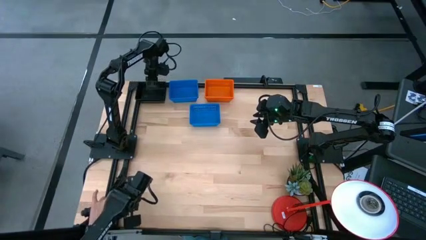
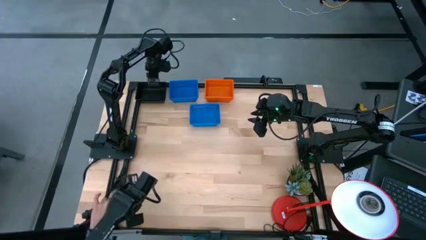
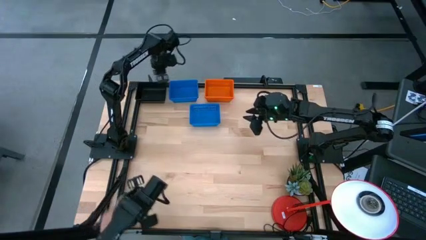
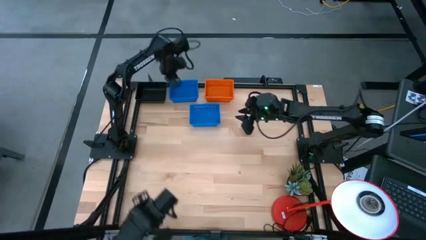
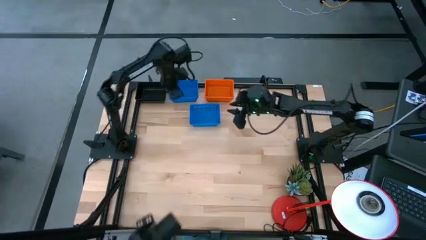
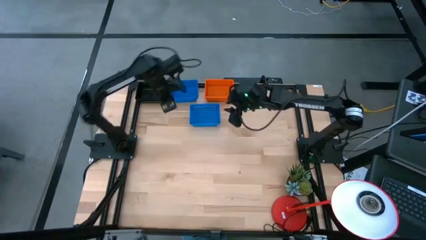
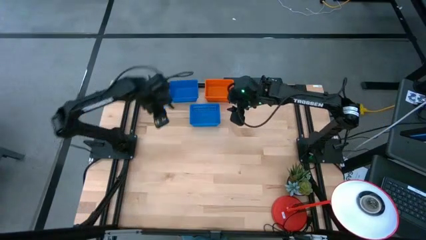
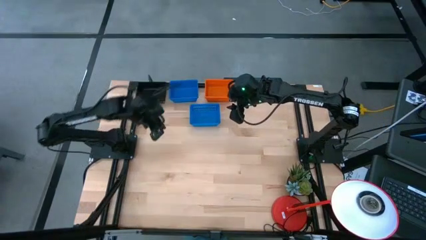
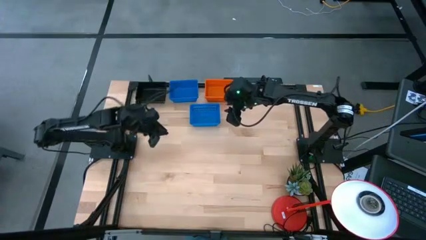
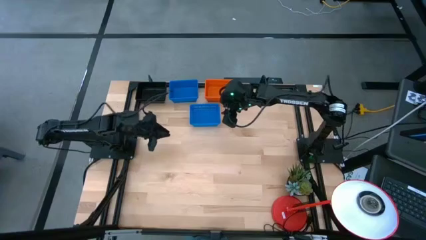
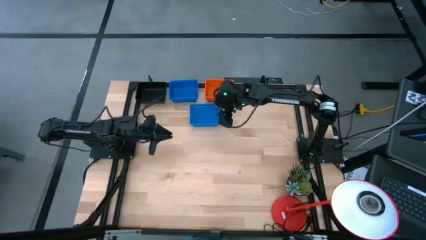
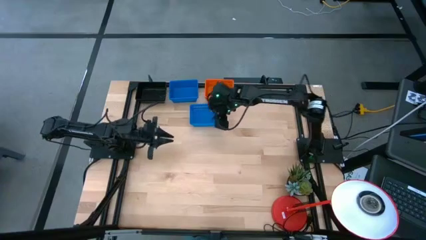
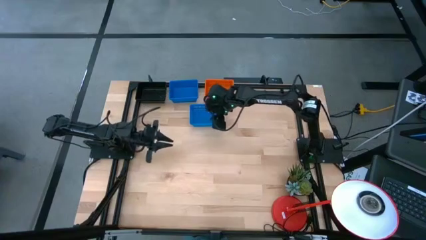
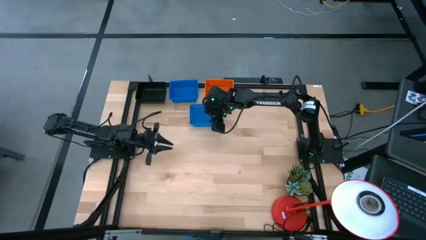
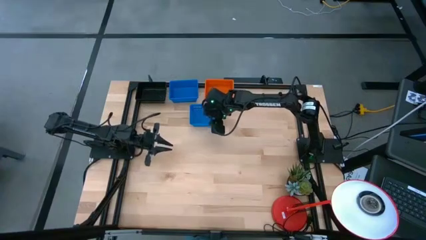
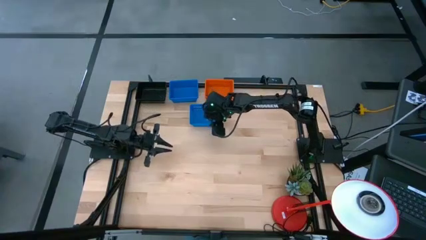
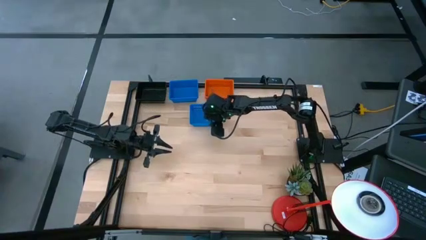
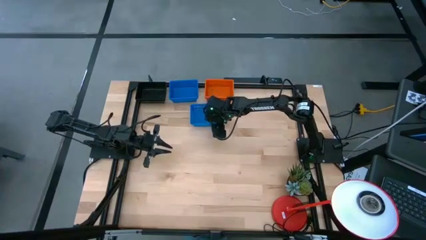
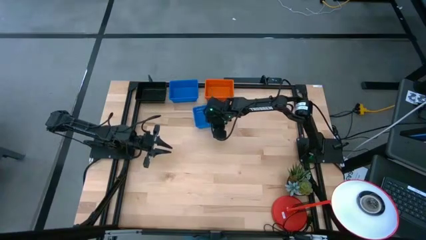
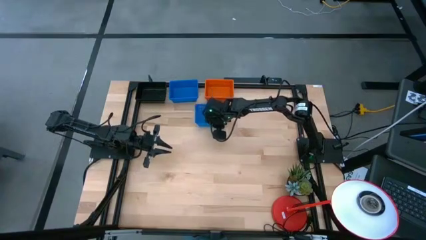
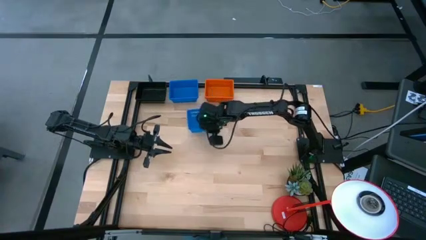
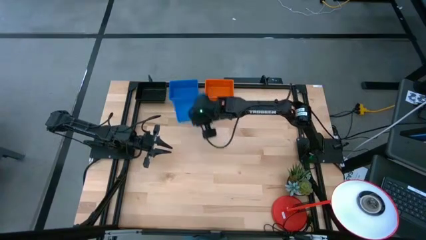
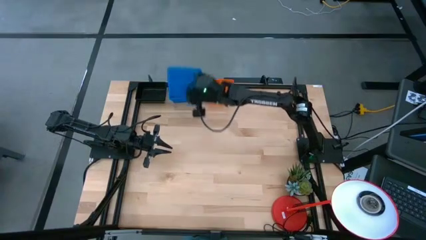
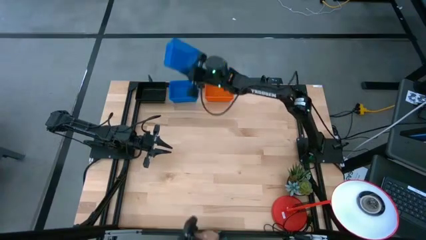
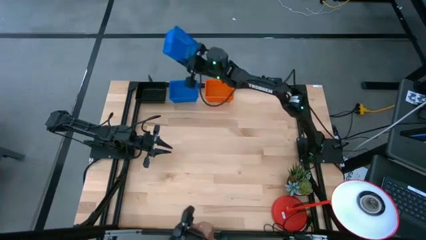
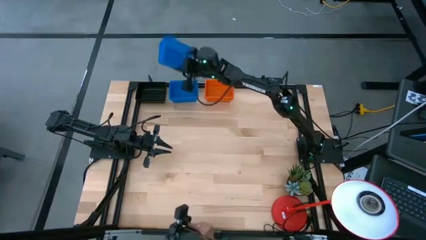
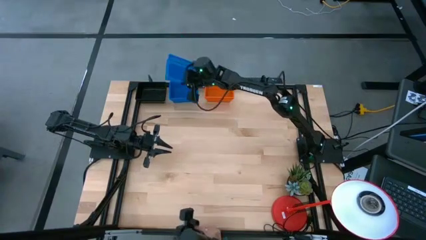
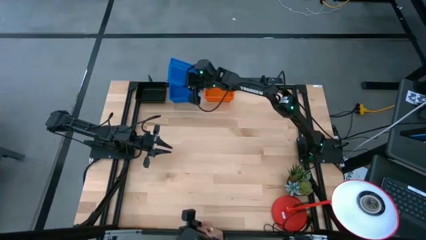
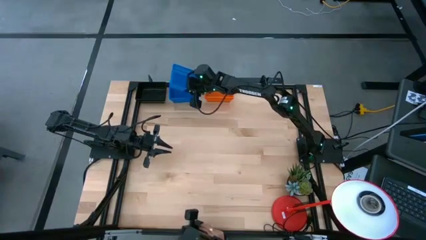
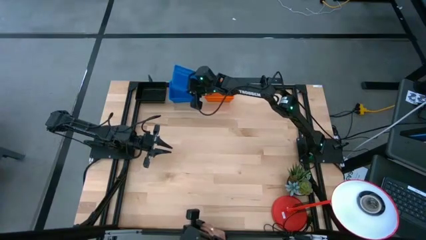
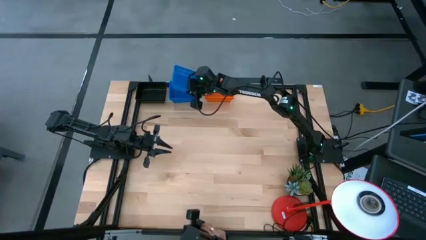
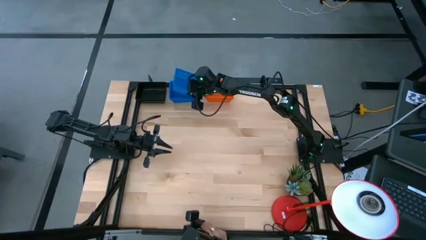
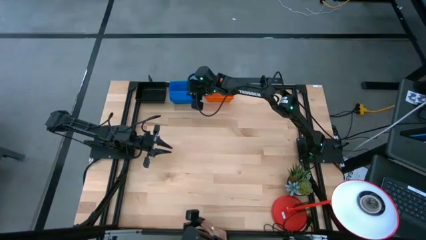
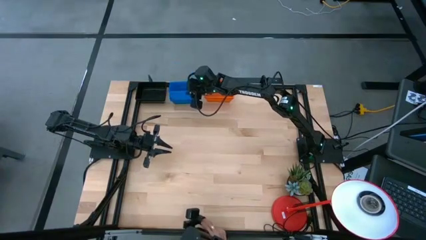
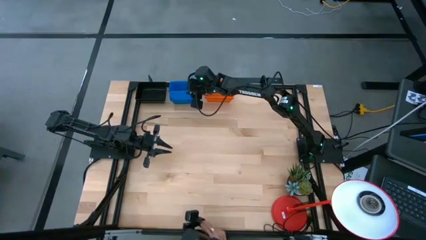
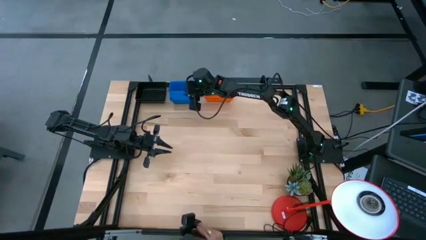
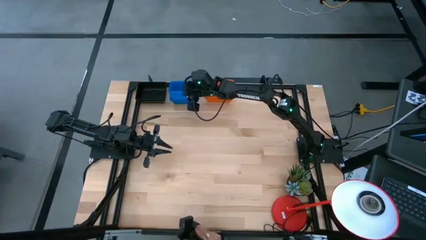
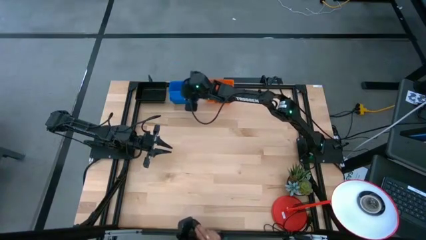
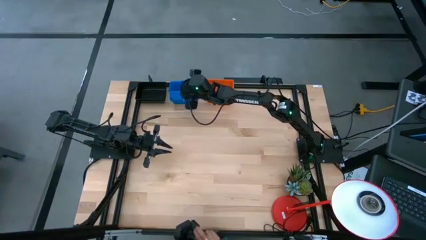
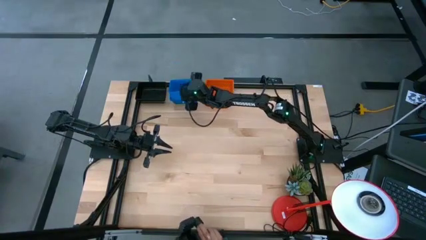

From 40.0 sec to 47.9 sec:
Stack the bottom blue bin on the top blue bin
